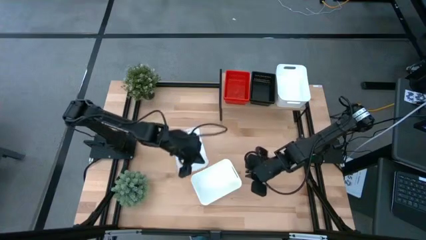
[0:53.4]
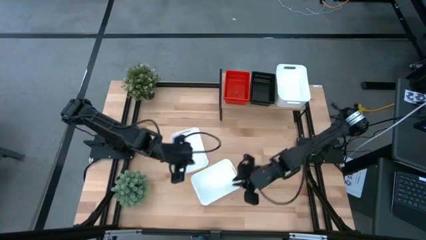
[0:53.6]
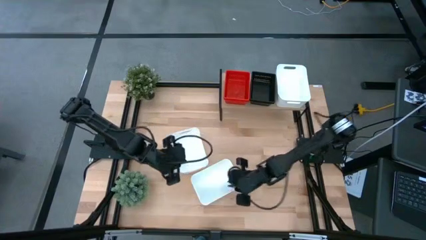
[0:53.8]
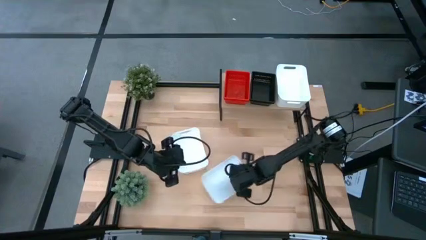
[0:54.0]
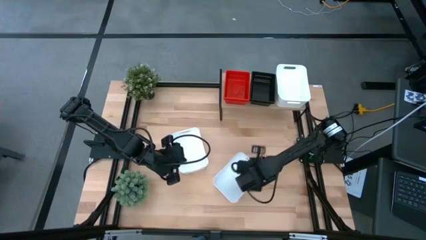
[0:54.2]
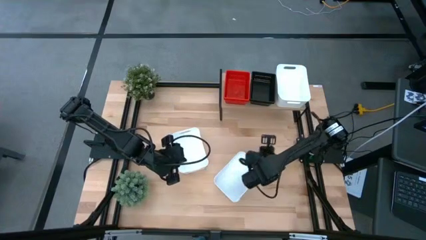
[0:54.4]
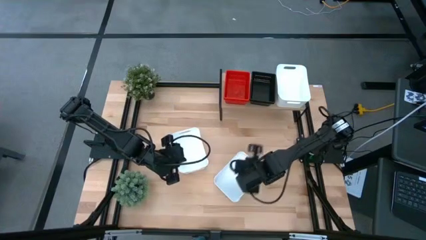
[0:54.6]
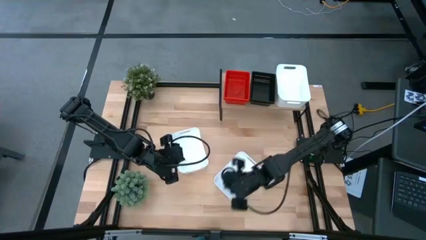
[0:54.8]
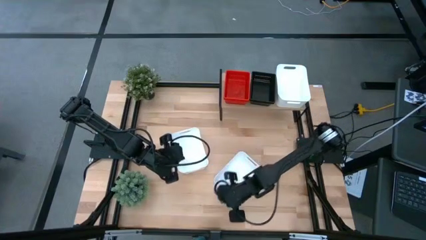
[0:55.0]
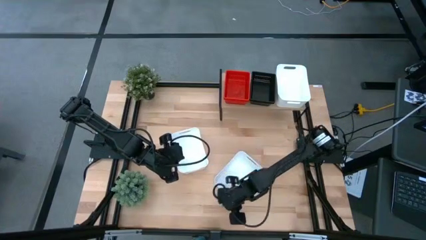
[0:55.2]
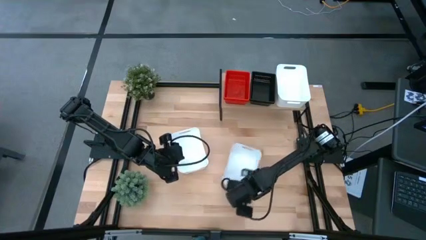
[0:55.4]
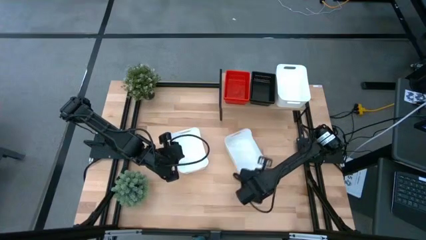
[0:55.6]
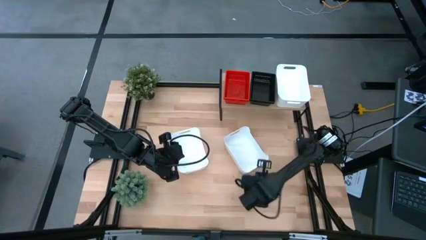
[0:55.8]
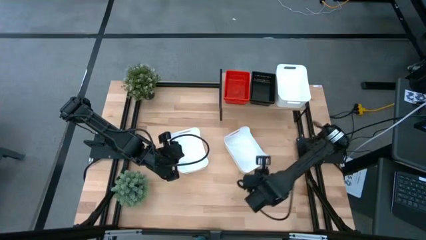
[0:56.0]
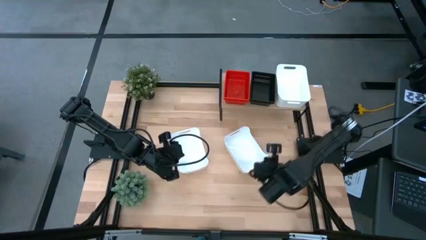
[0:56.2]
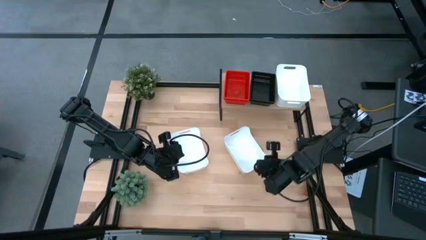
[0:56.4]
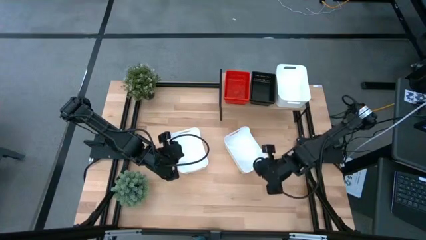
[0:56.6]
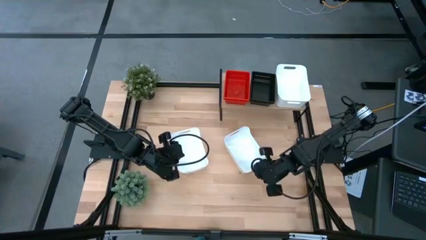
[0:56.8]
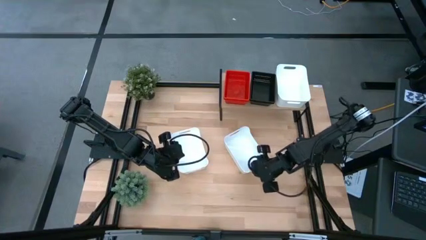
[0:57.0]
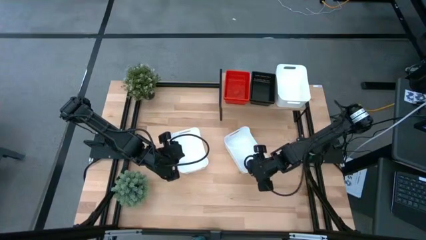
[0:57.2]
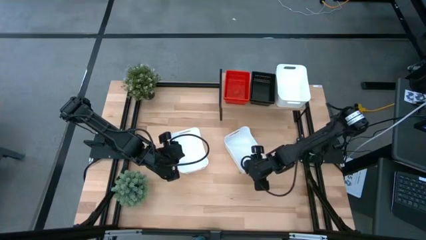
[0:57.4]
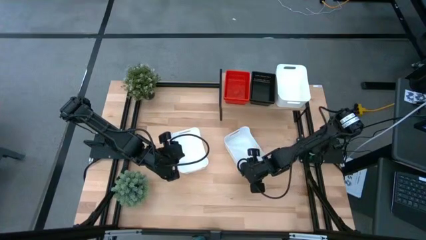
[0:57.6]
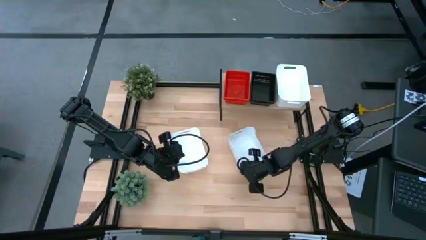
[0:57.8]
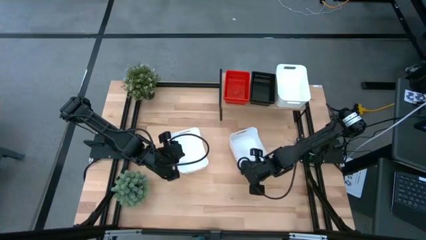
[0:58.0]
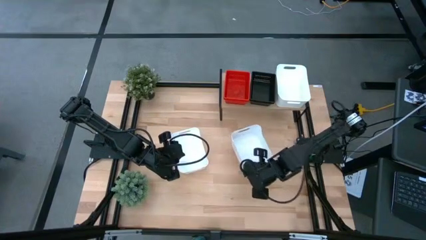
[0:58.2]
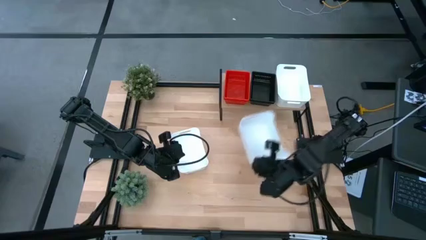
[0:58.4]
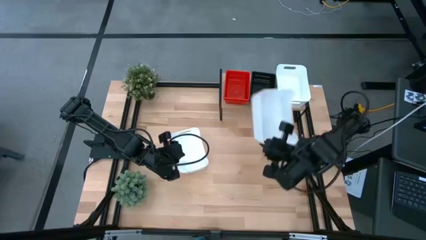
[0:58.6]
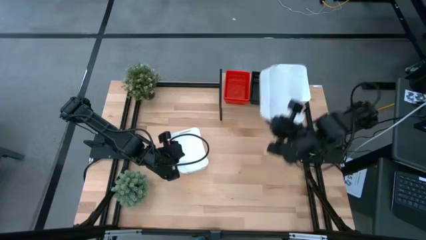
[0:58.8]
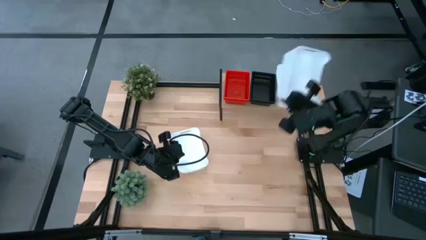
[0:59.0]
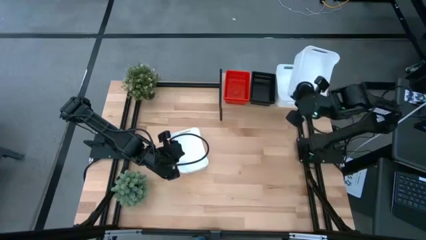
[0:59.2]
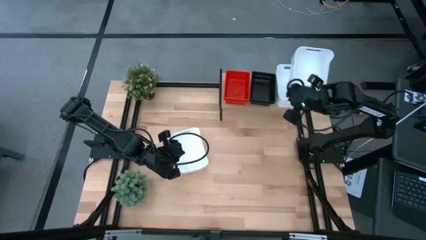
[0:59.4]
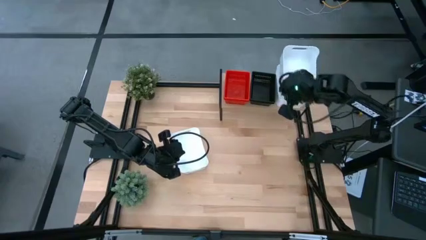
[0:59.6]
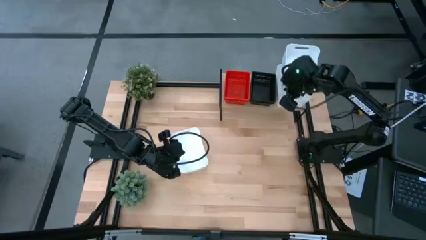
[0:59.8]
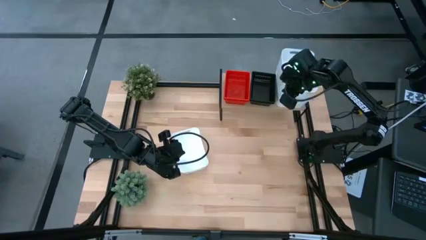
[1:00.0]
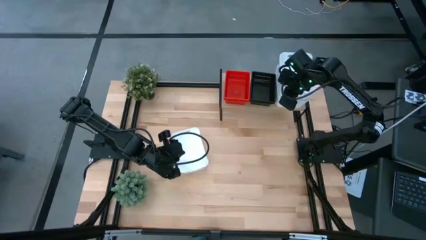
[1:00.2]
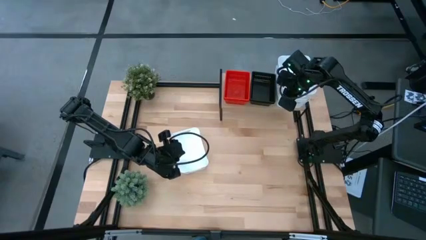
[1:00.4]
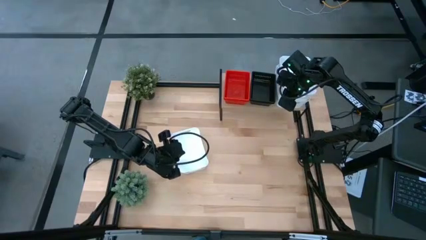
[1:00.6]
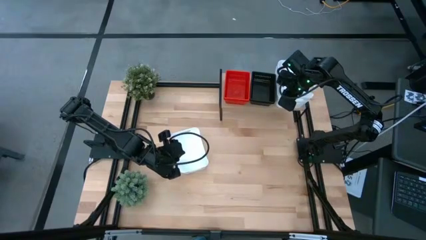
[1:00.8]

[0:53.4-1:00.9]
Task: Stack baskets on shelf by color
Stack the bottom white bin on the top of the white bin on the shelf

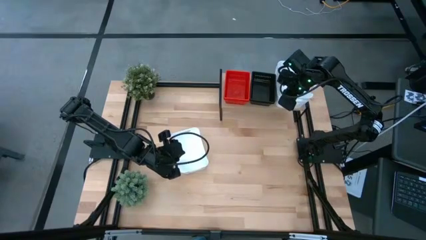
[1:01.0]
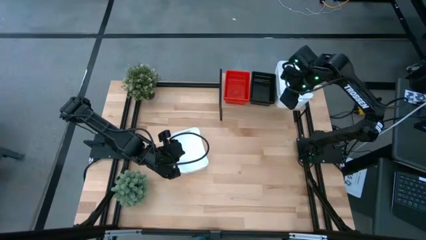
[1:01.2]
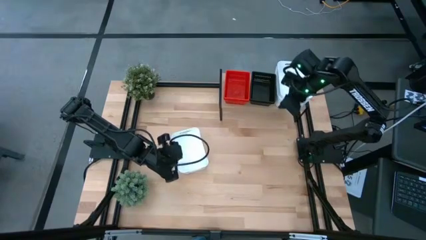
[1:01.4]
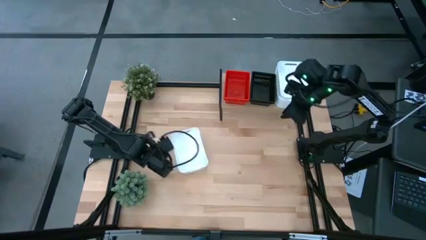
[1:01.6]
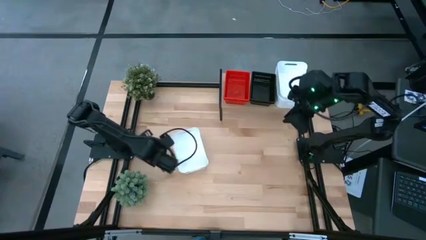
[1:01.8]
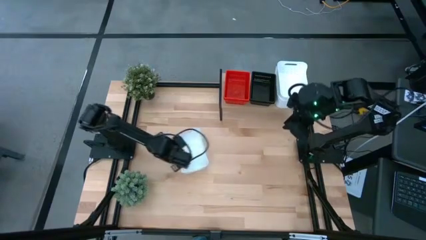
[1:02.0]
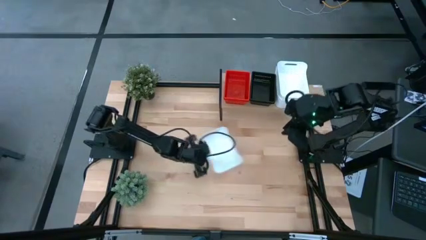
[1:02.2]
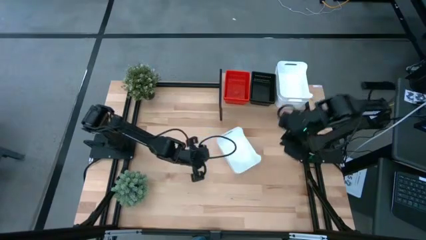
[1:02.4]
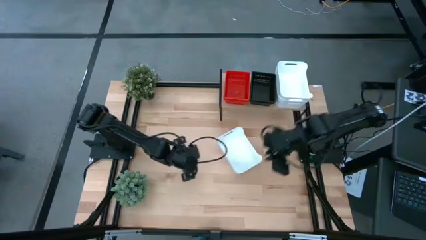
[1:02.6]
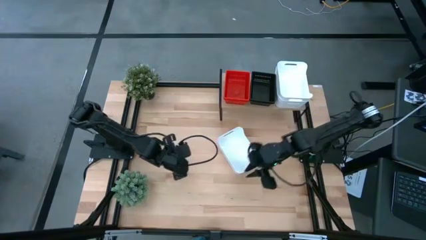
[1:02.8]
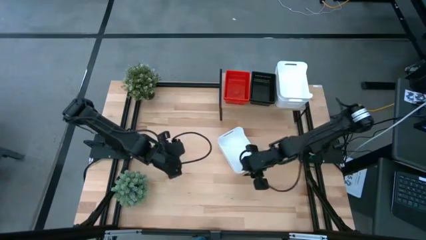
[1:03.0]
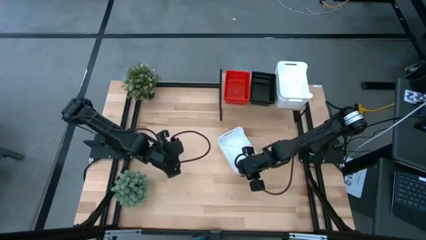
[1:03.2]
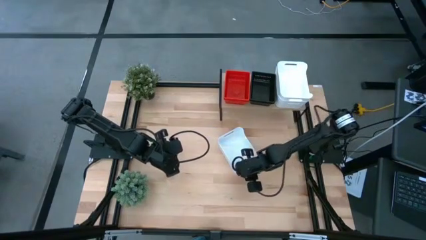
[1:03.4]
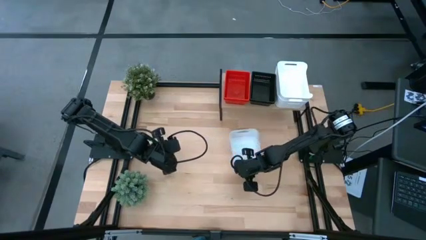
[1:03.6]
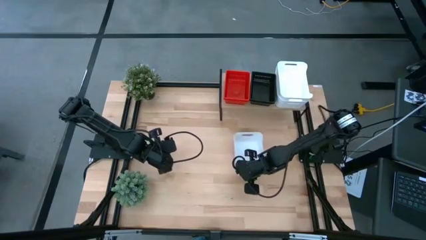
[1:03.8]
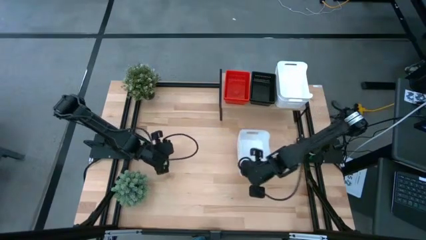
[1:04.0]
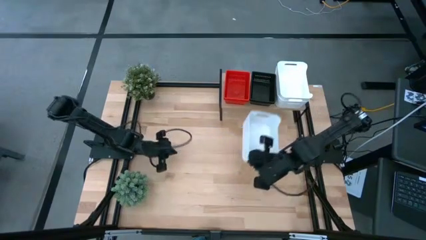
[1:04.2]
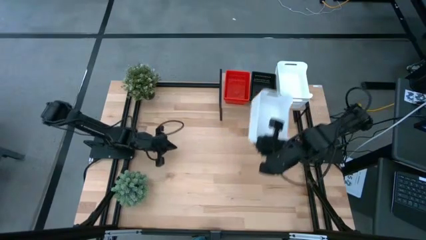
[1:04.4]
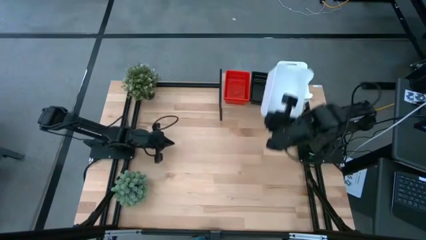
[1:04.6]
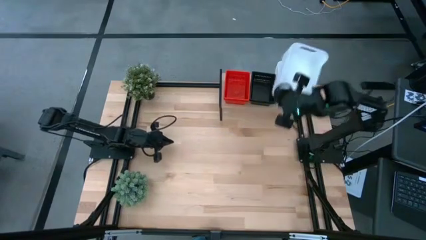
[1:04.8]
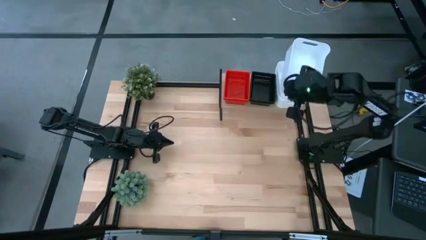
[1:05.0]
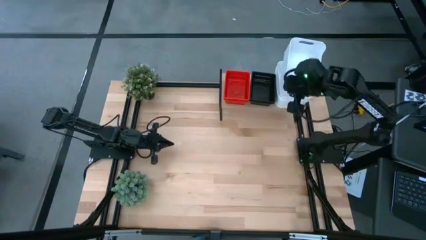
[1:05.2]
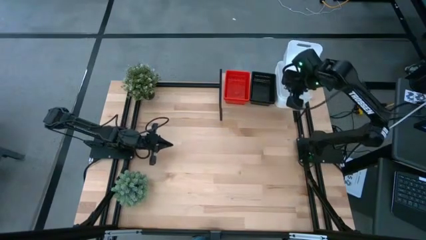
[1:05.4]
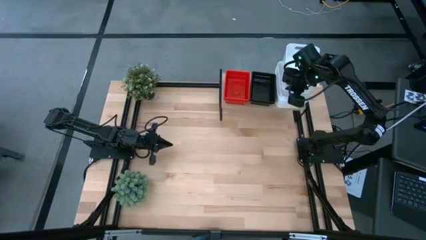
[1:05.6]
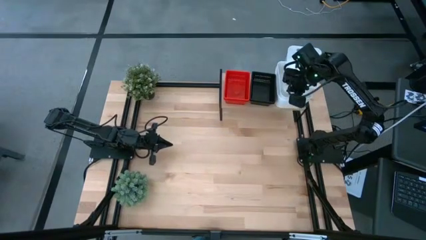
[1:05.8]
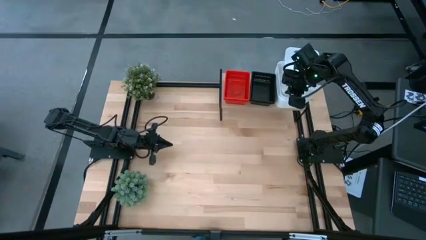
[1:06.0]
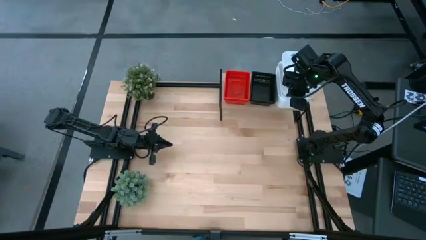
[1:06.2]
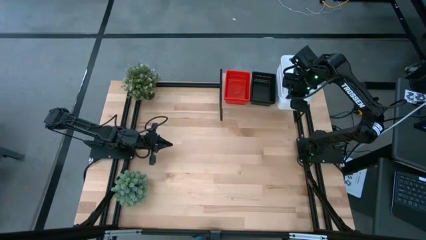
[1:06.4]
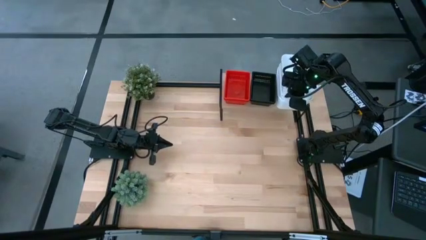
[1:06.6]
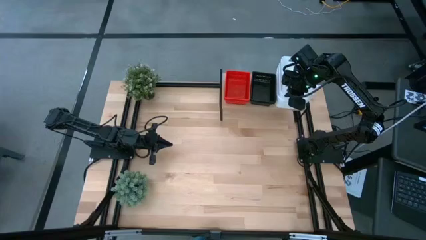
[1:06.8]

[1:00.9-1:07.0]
Stack the right white bin on the top of the white bins on the shelf

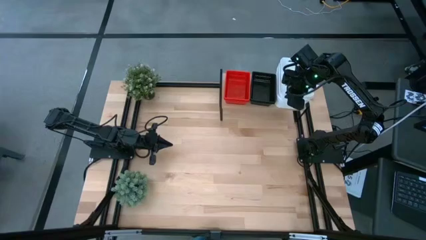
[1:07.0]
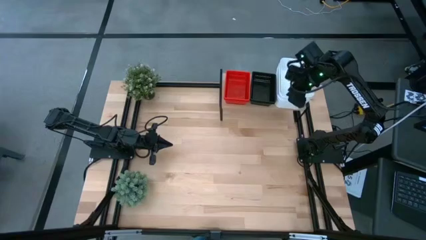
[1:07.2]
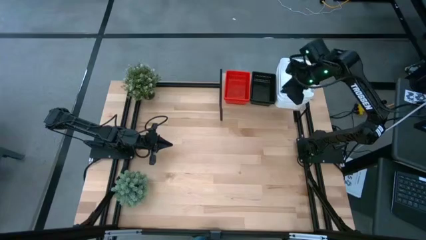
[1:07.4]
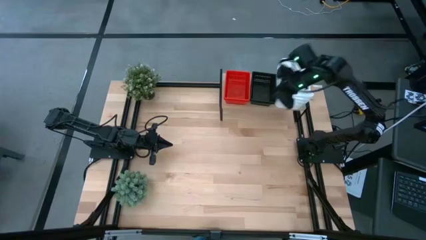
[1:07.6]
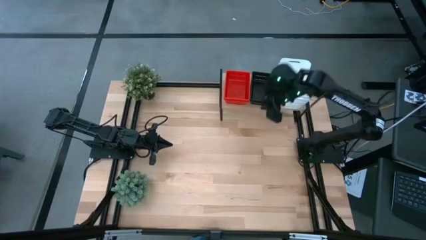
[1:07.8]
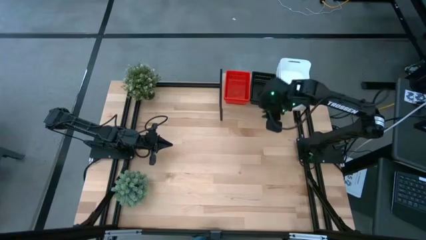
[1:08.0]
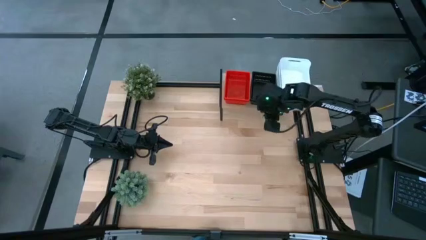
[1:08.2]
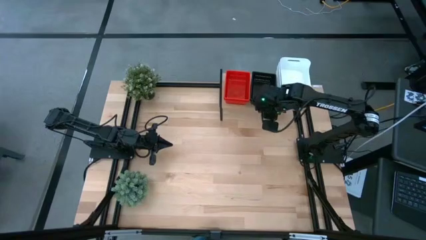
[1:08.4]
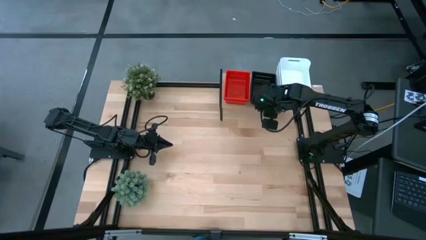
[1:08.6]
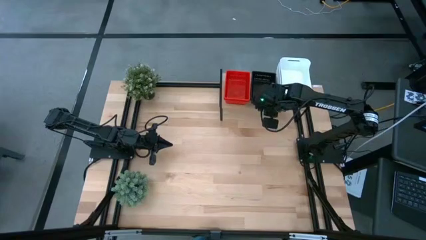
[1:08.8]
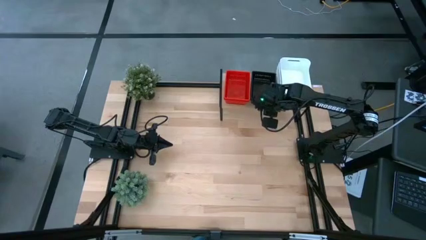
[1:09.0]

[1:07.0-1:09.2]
Adjust the stacked black bins on the shelf

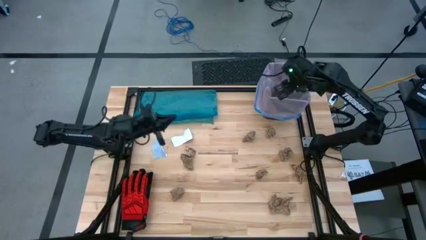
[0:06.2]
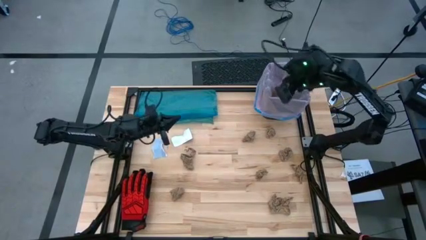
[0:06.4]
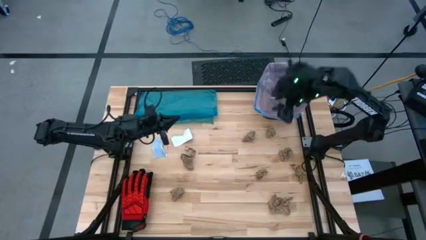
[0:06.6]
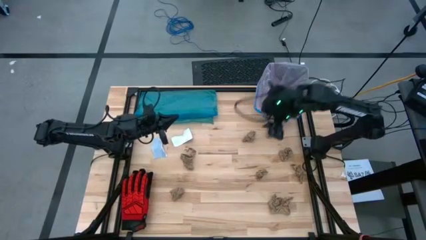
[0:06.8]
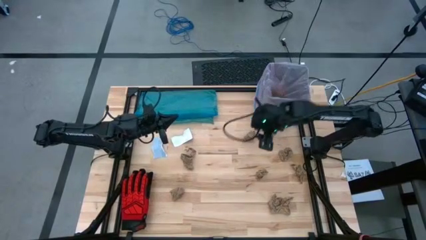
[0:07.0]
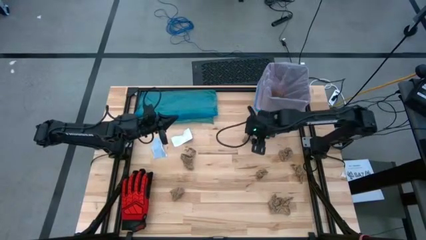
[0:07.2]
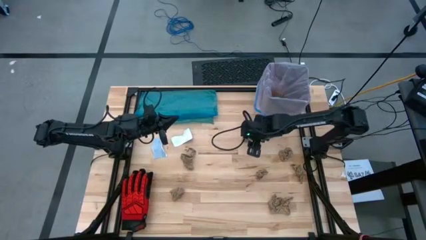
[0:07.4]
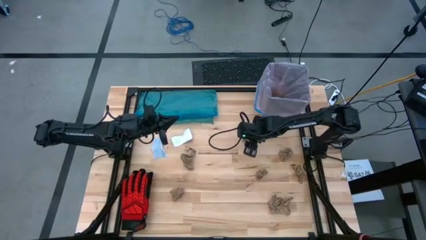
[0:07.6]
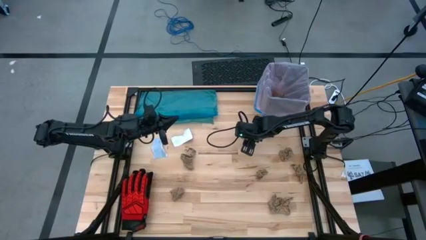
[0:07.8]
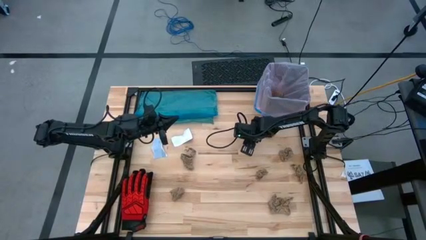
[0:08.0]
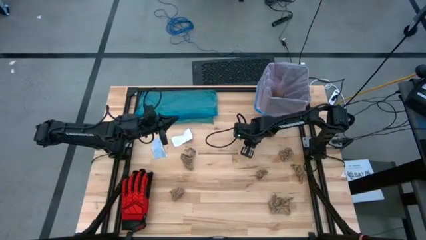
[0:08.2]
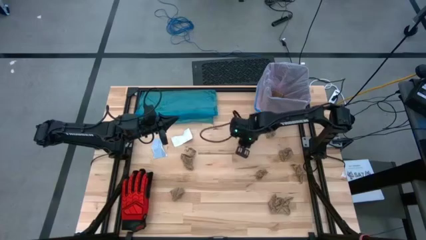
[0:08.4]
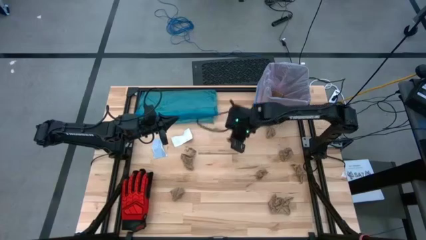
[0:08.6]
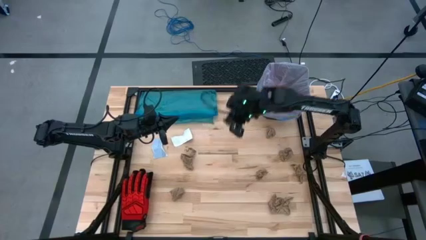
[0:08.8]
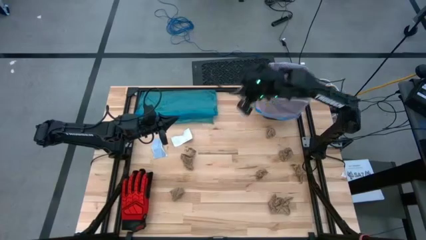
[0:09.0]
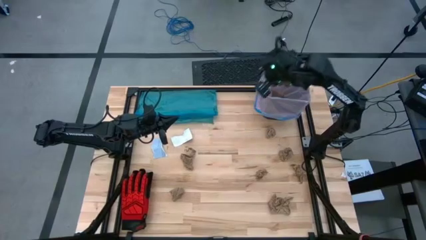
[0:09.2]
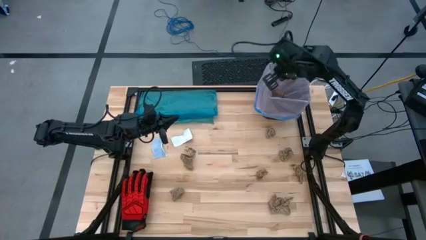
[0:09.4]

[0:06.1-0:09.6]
Task: place trash/remove bag and relplace
Put the brown napkin into the trash bin
